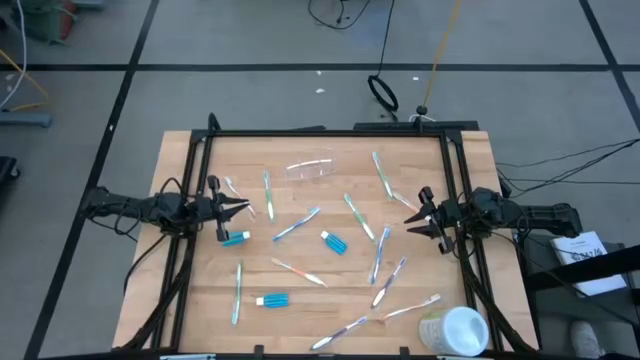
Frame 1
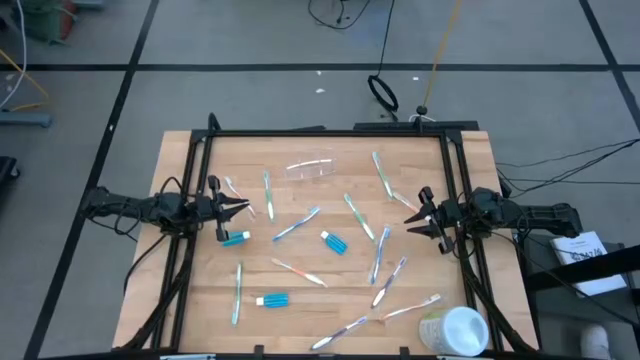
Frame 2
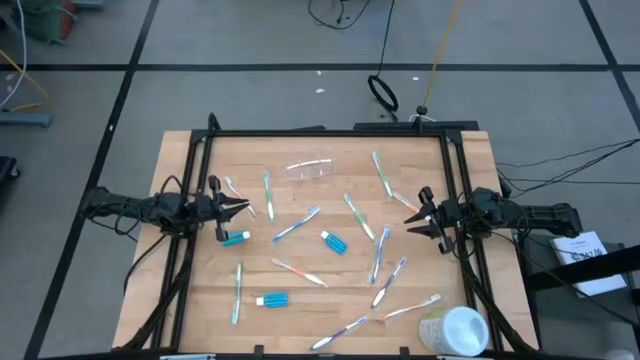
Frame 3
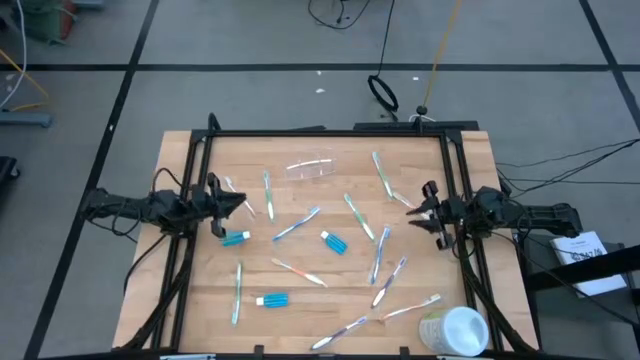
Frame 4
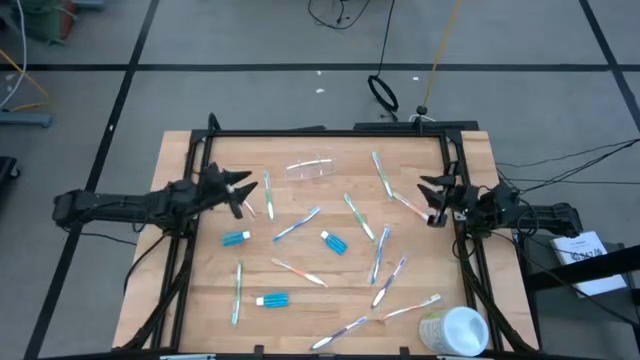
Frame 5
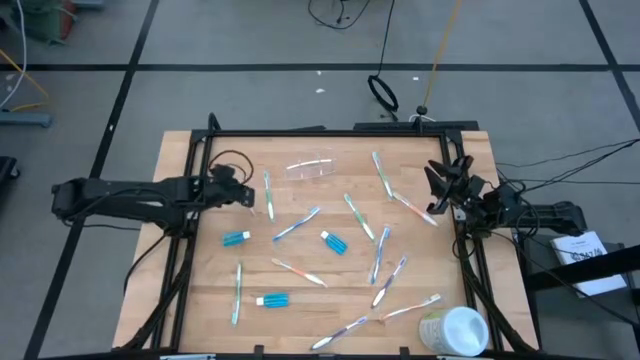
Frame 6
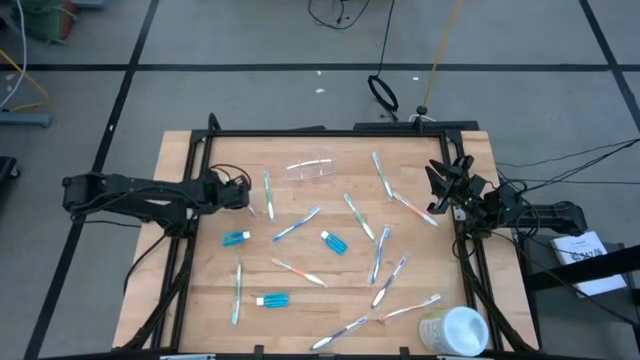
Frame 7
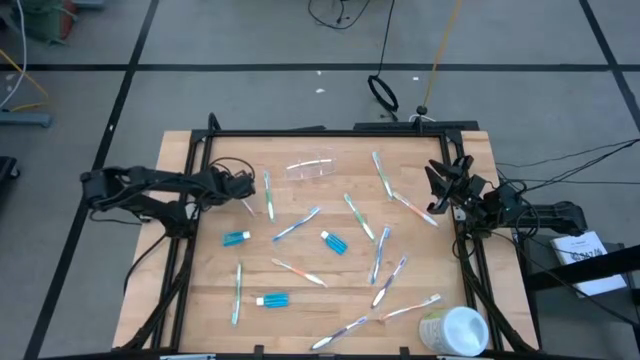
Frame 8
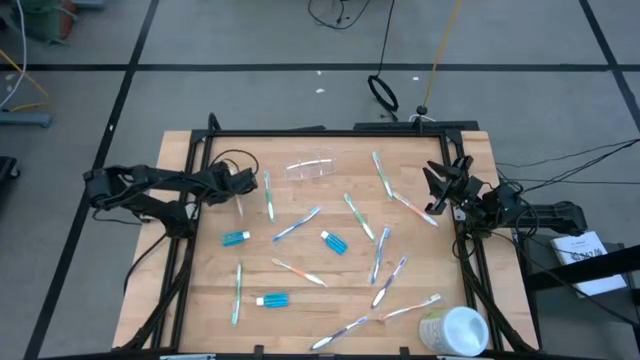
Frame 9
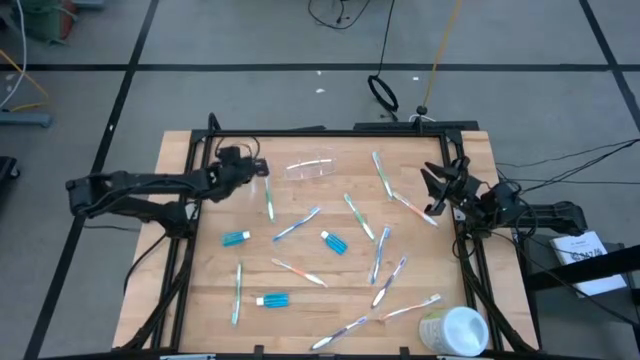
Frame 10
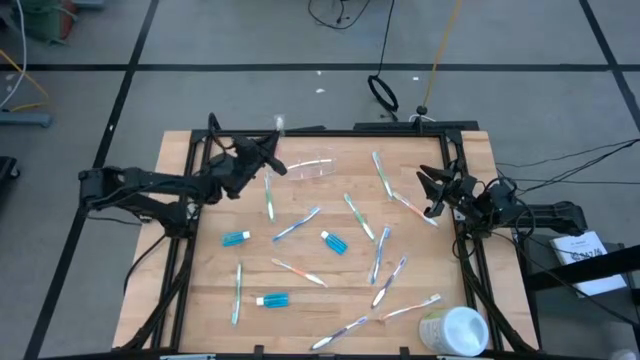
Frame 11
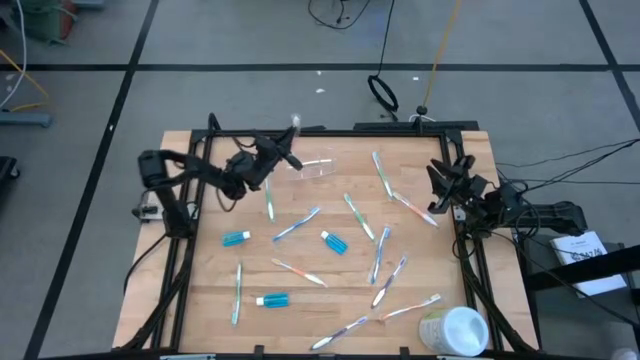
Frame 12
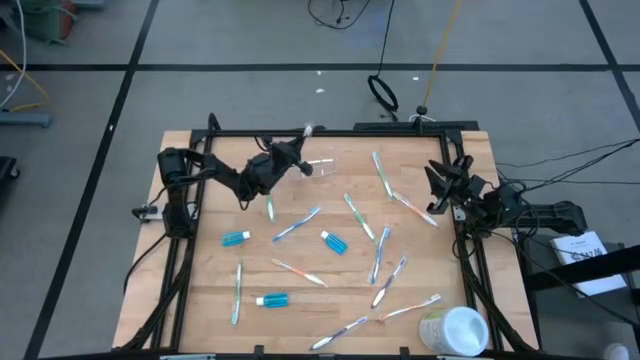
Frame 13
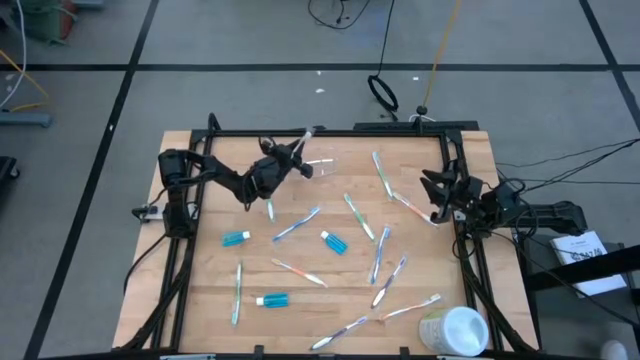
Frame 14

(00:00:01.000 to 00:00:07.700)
Task: Pick & Place toothbrushing station
Put the orange toothbrush into the transparent bin organizer

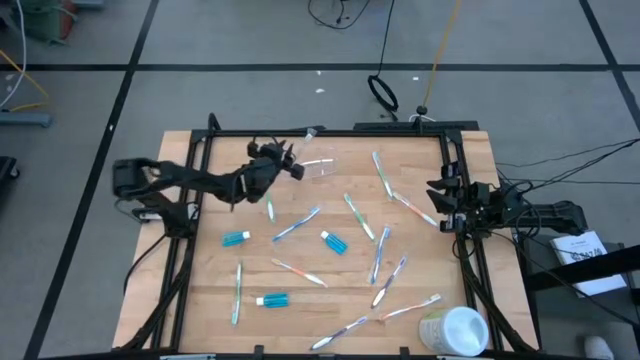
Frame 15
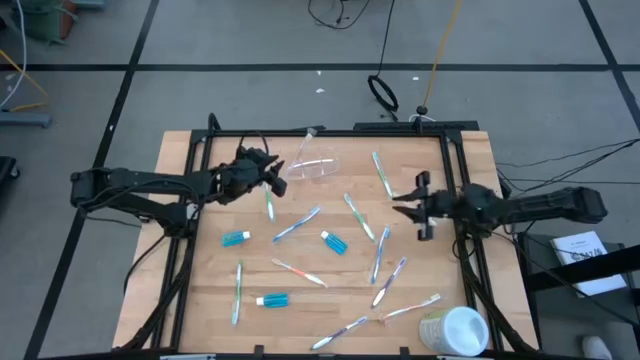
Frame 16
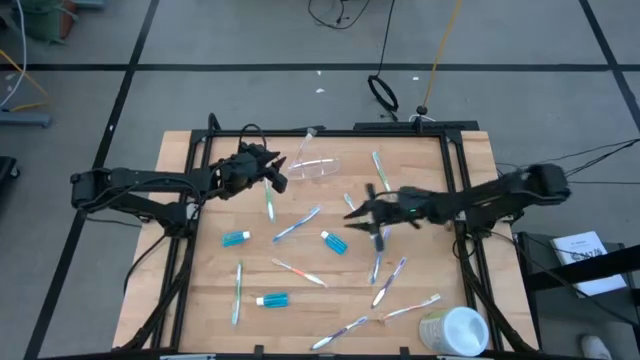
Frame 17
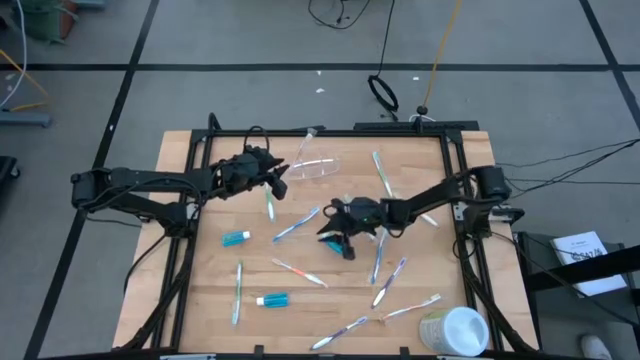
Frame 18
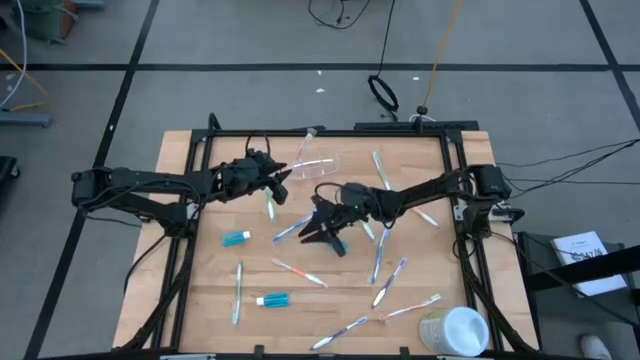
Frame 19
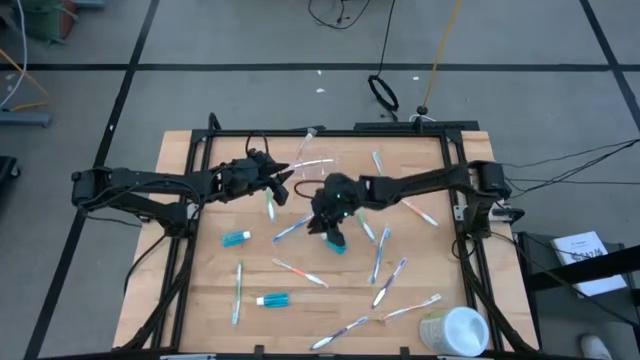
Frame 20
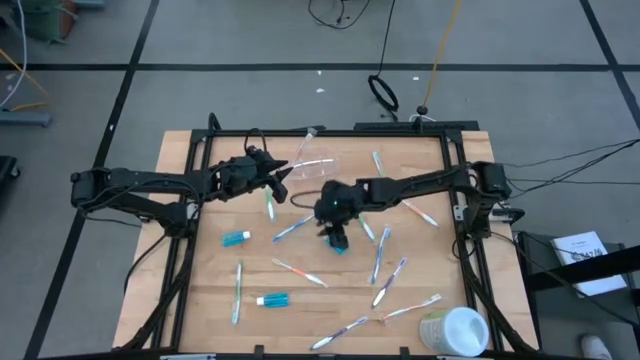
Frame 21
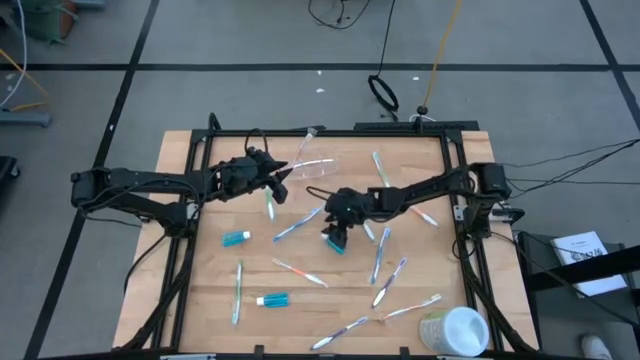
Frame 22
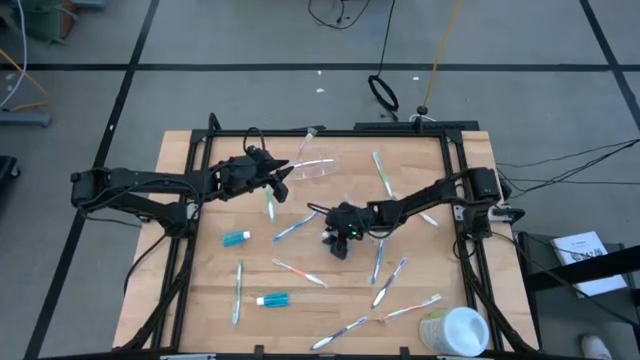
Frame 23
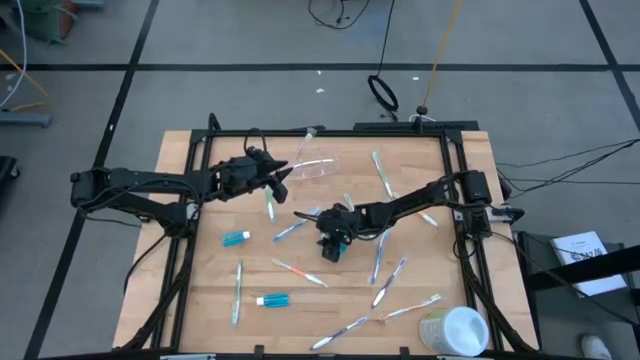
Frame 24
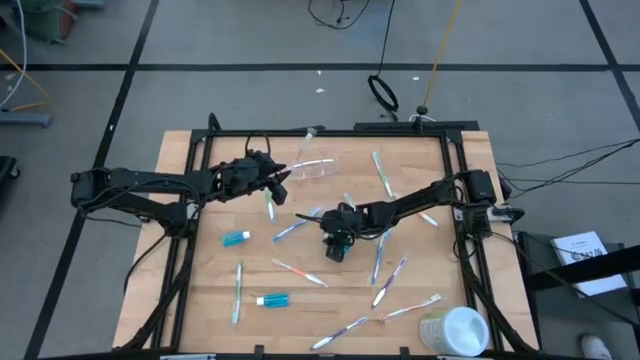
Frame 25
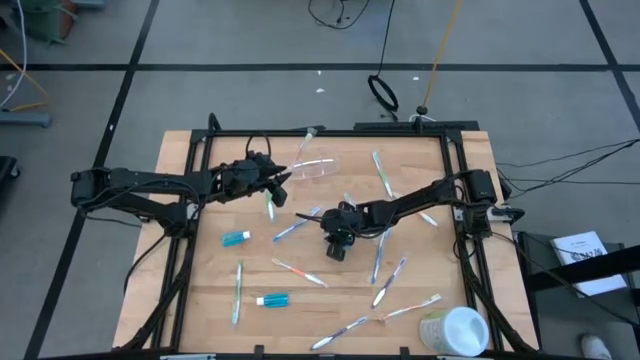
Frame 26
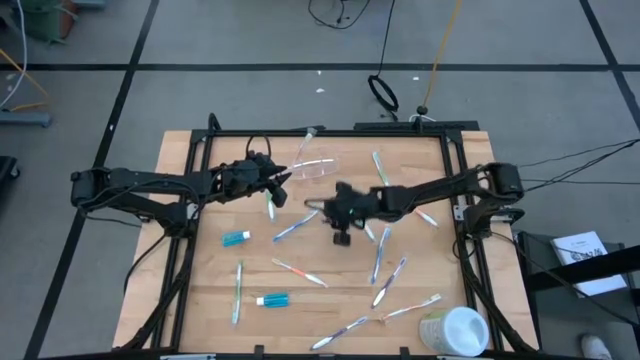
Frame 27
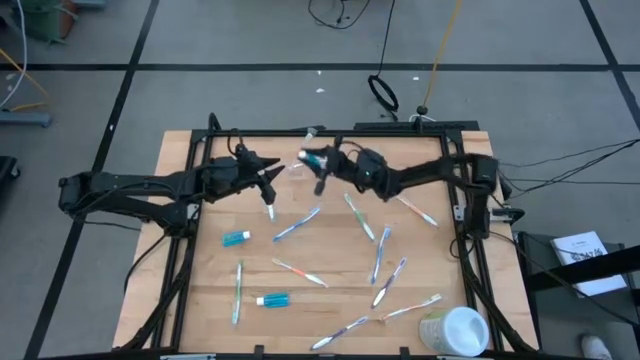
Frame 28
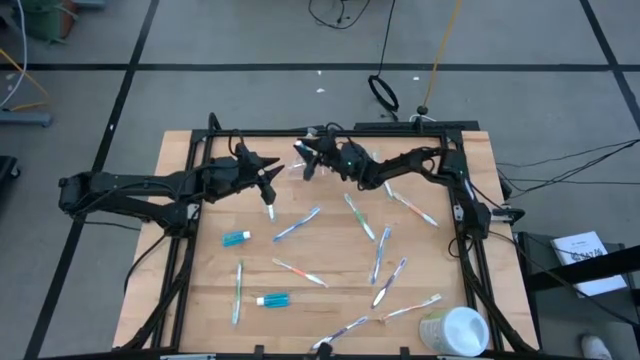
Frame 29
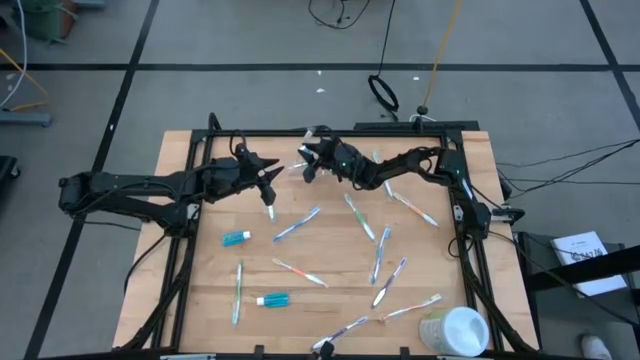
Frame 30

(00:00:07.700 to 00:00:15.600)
Put the blue mouthwash into the transparent bin organizer

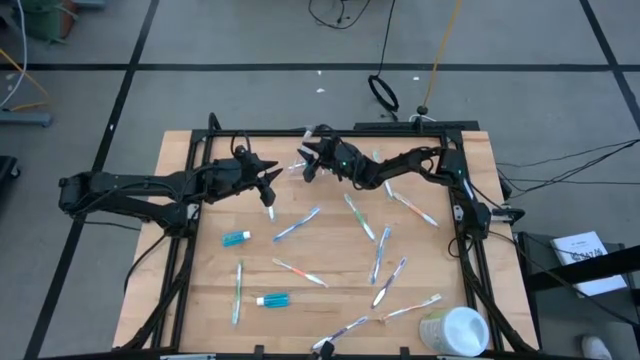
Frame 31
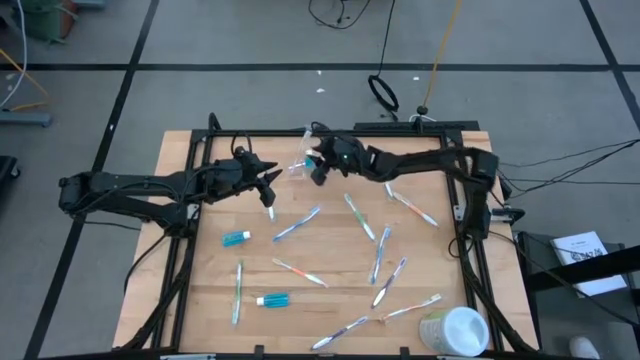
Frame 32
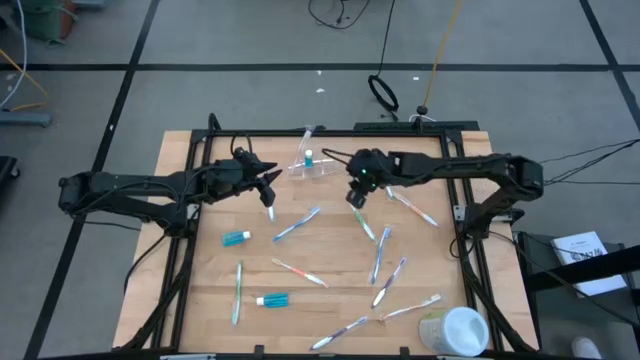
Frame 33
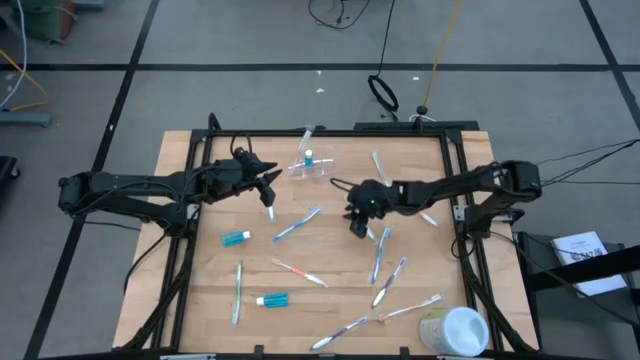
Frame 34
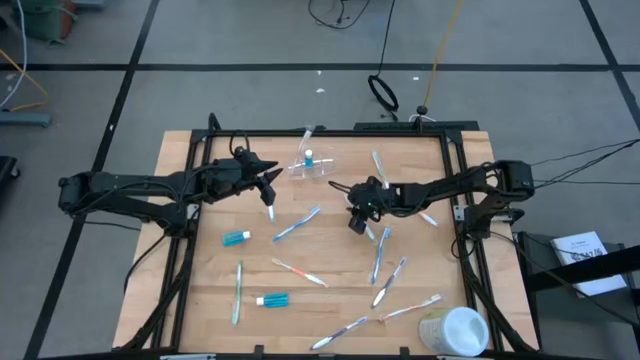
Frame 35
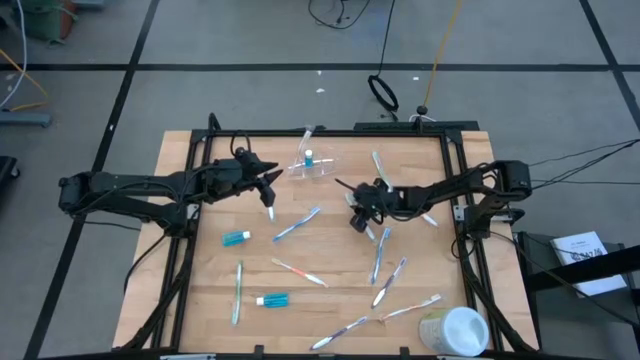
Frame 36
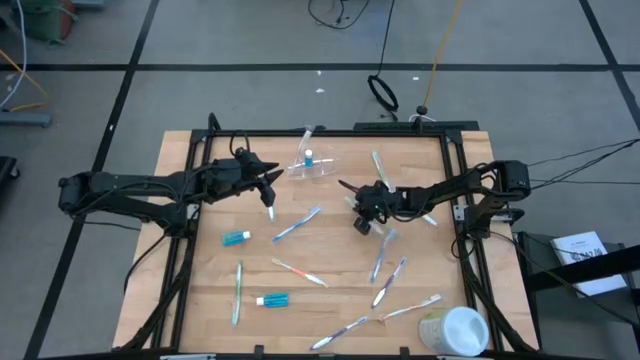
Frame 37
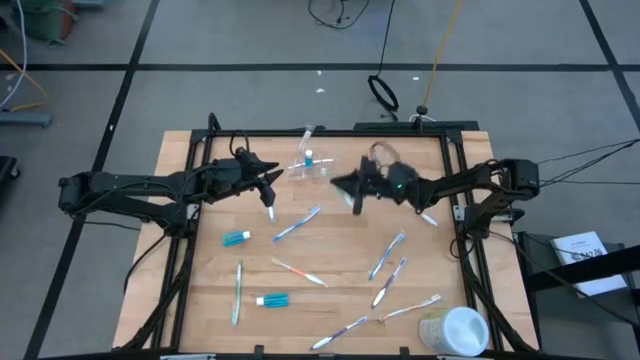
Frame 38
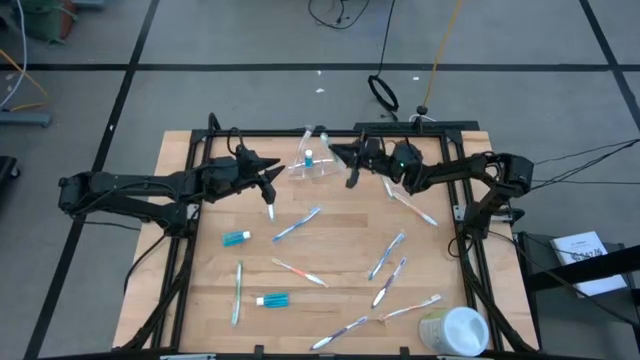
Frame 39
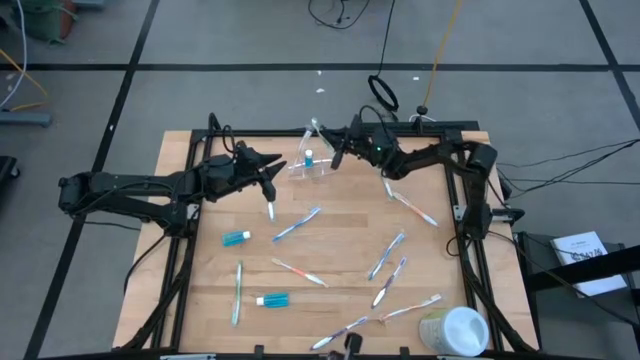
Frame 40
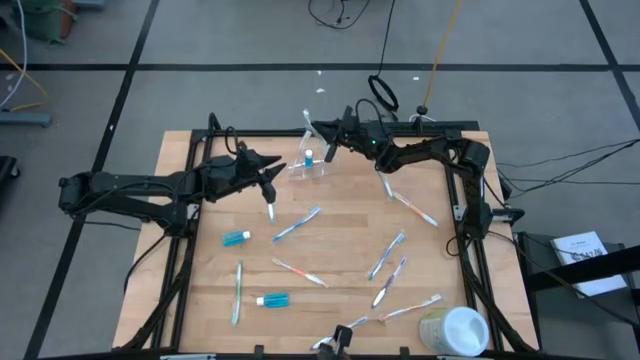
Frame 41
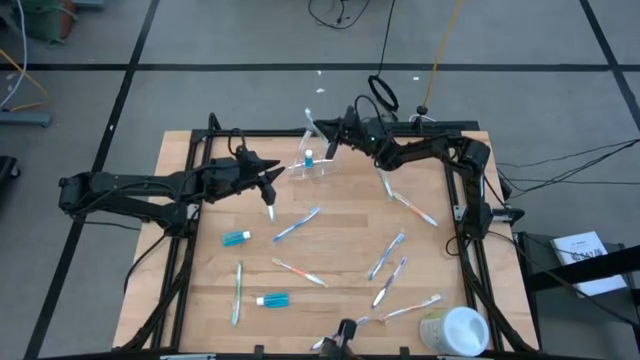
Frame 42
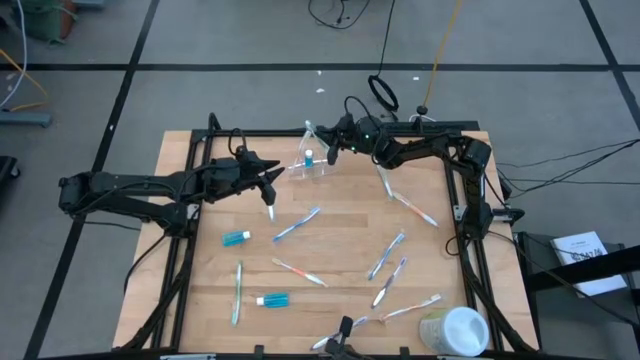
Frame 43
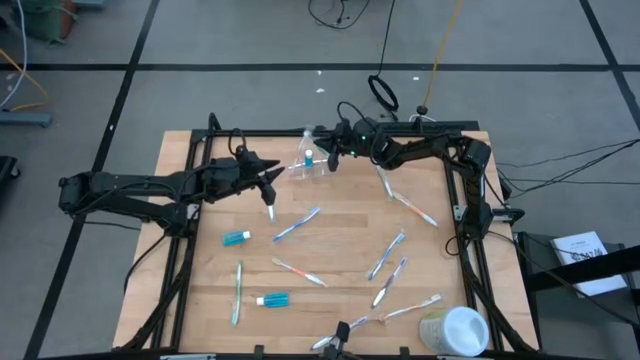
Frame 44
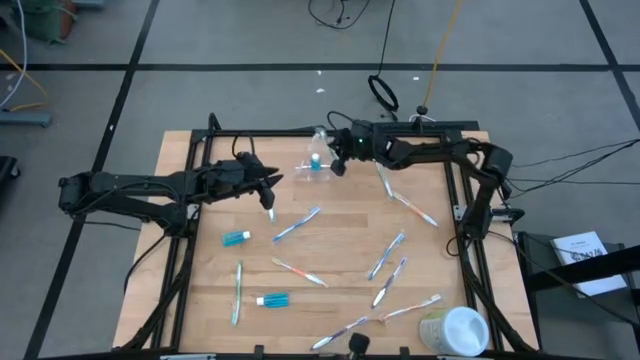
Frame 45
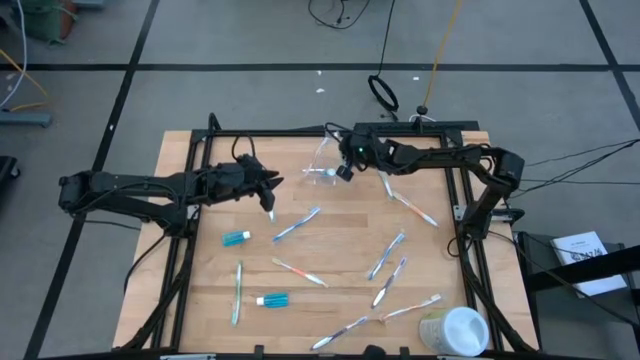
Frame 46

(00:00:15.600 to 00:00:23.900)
Put the green toothbrush into the transparent bin organizer
